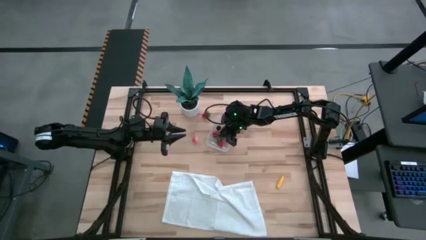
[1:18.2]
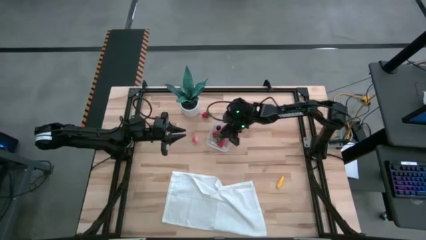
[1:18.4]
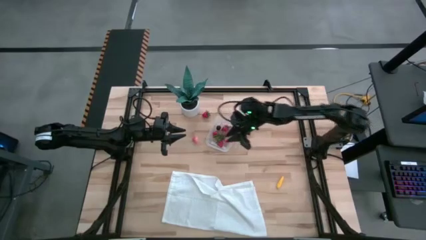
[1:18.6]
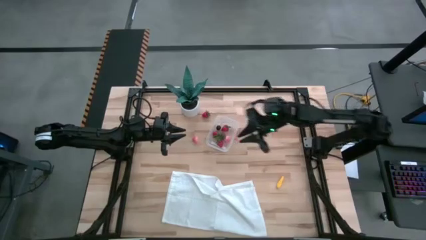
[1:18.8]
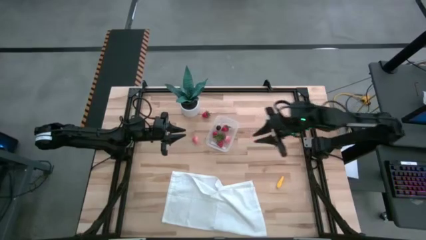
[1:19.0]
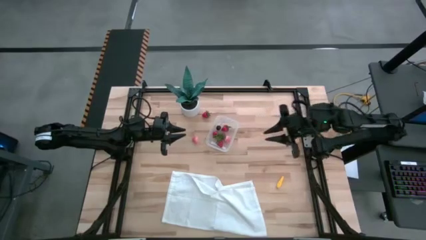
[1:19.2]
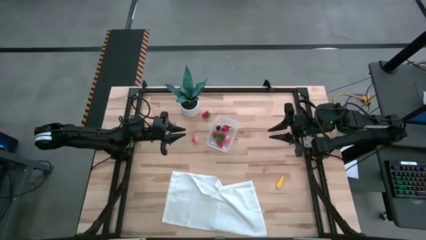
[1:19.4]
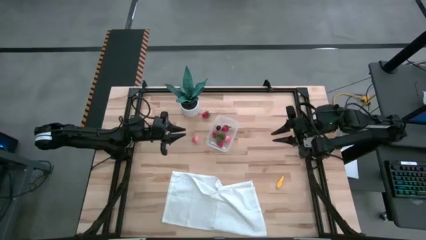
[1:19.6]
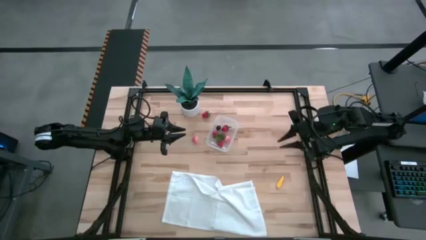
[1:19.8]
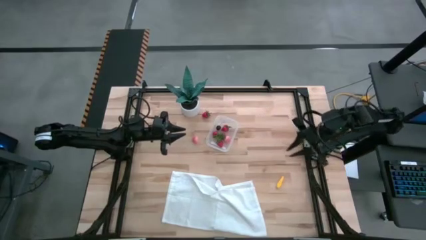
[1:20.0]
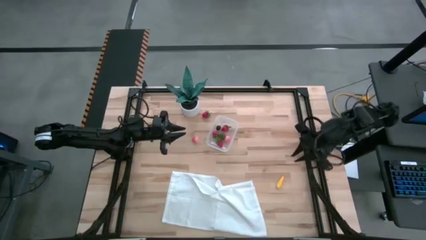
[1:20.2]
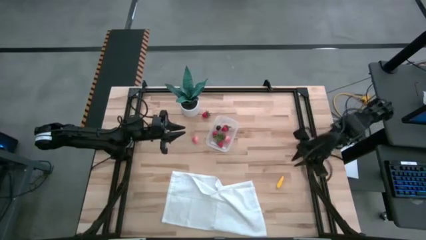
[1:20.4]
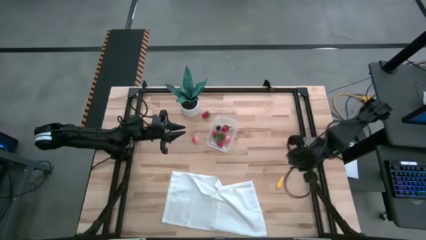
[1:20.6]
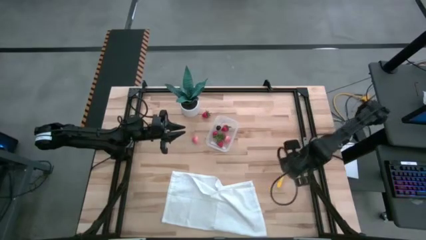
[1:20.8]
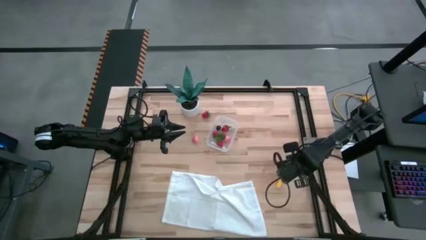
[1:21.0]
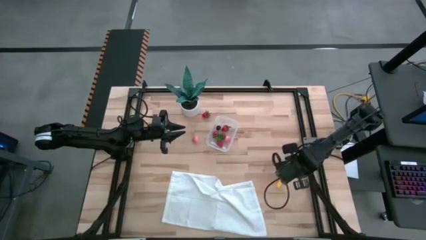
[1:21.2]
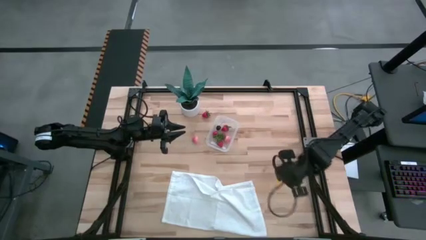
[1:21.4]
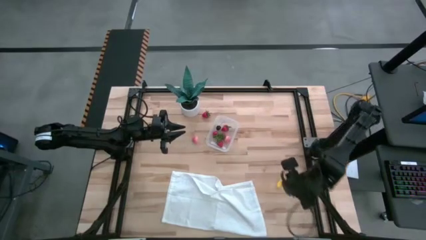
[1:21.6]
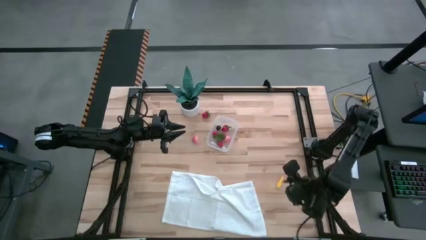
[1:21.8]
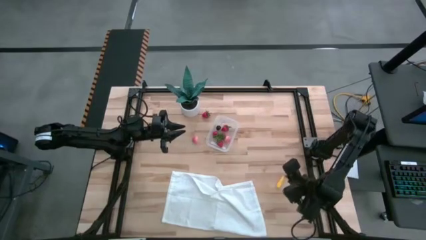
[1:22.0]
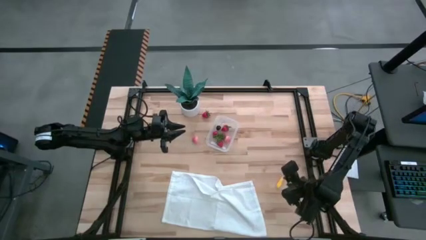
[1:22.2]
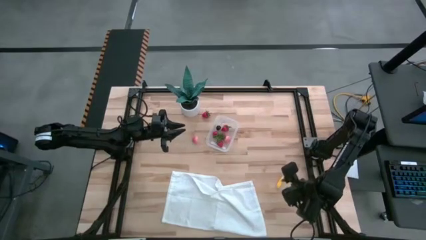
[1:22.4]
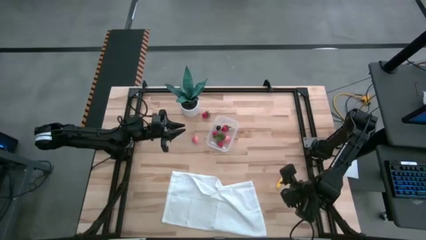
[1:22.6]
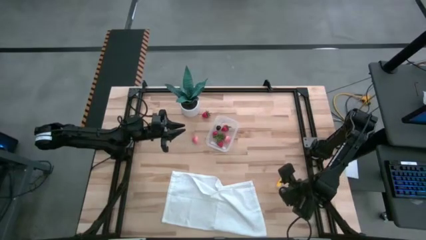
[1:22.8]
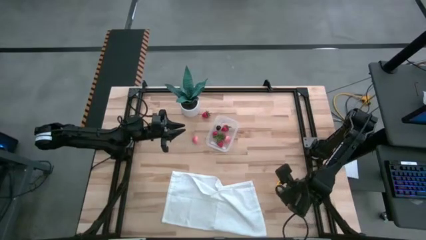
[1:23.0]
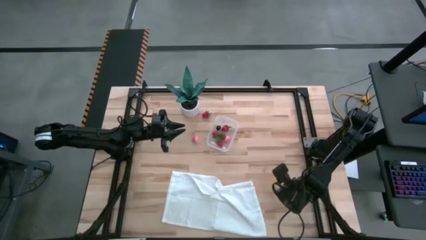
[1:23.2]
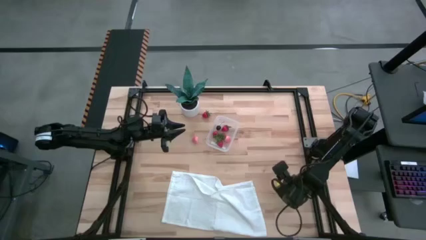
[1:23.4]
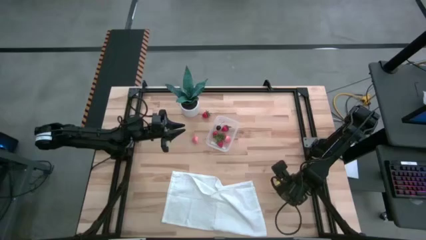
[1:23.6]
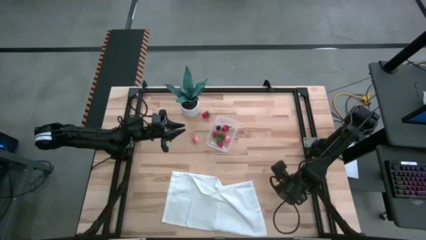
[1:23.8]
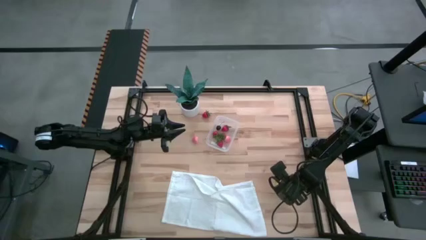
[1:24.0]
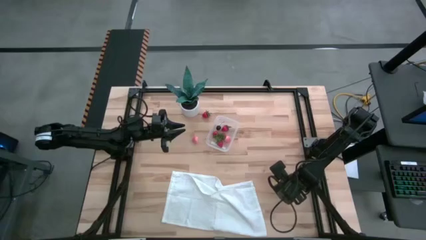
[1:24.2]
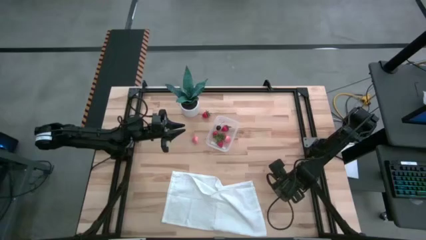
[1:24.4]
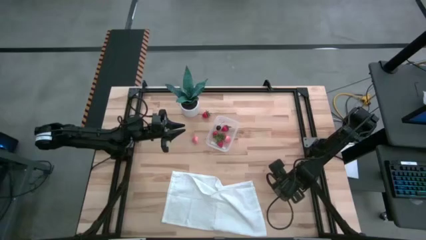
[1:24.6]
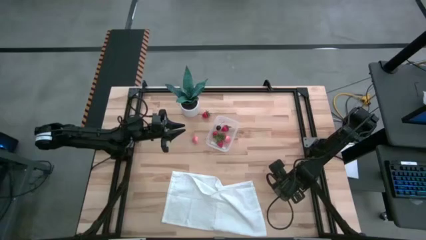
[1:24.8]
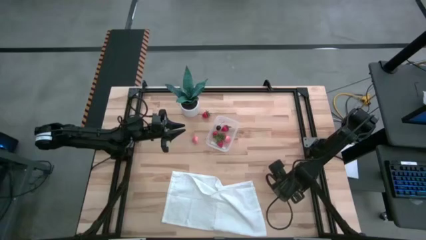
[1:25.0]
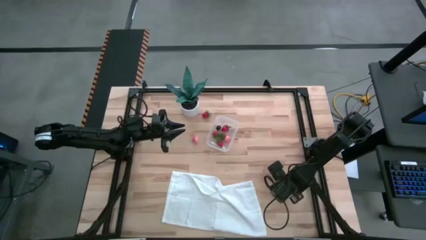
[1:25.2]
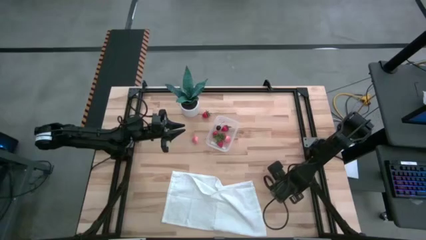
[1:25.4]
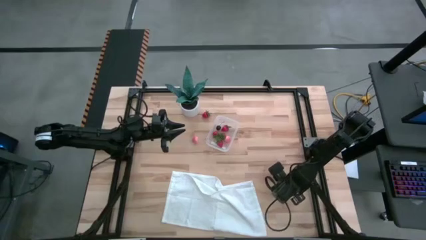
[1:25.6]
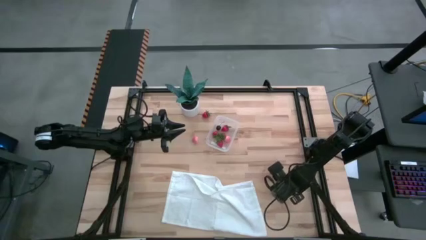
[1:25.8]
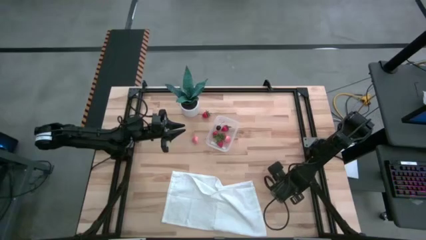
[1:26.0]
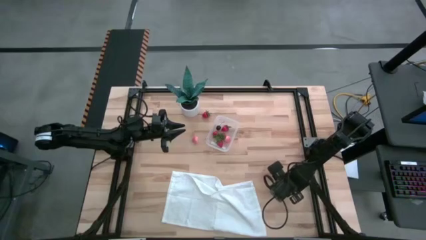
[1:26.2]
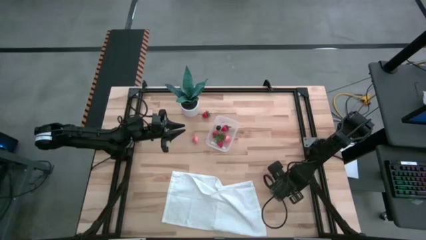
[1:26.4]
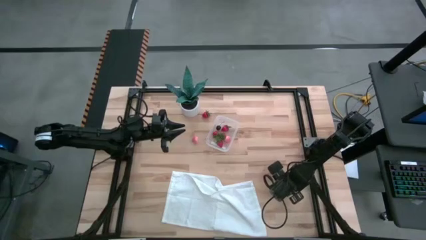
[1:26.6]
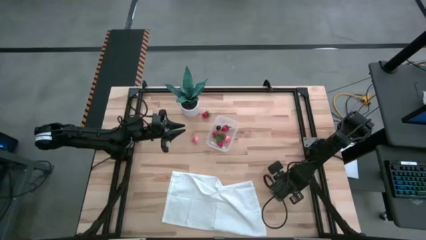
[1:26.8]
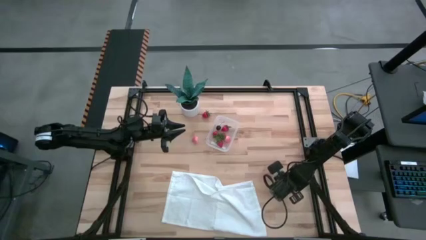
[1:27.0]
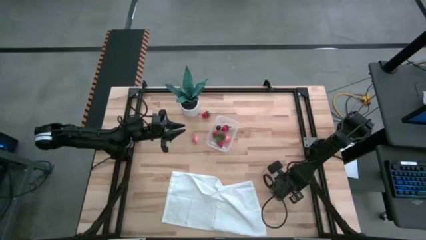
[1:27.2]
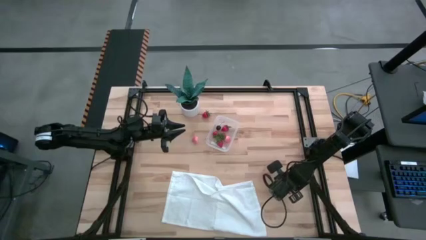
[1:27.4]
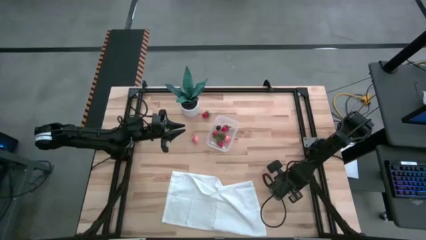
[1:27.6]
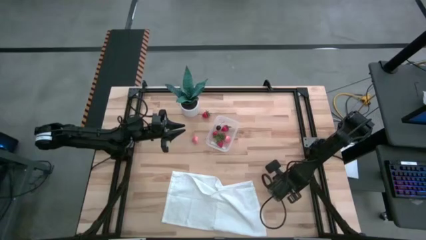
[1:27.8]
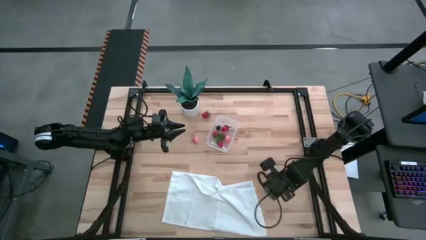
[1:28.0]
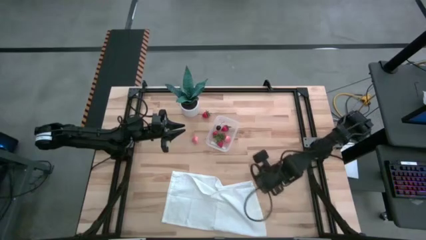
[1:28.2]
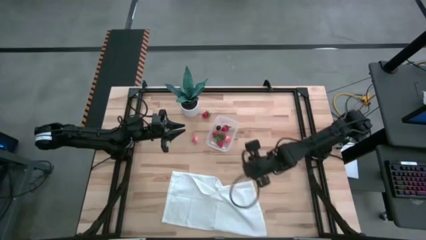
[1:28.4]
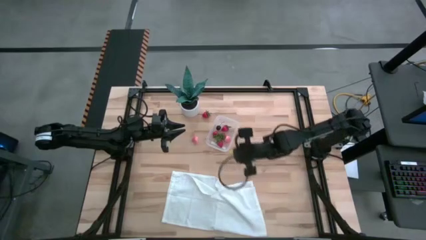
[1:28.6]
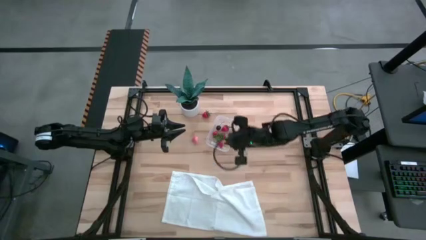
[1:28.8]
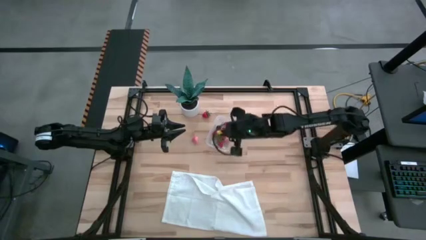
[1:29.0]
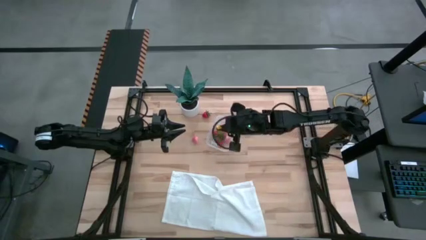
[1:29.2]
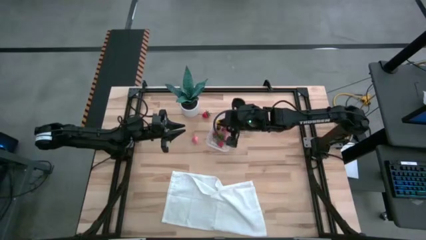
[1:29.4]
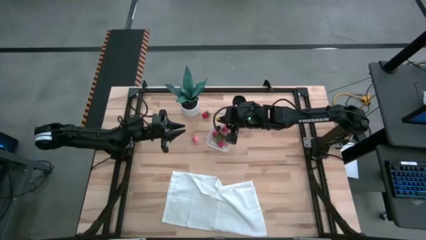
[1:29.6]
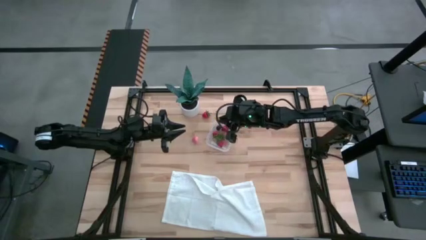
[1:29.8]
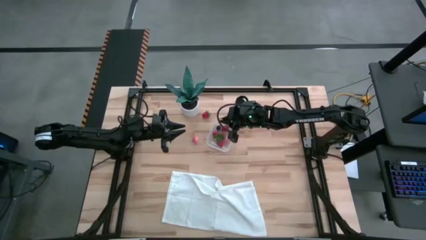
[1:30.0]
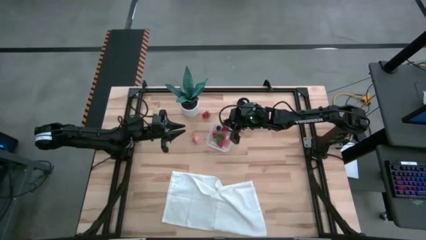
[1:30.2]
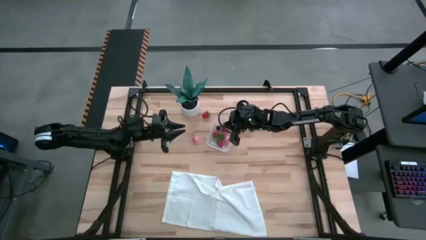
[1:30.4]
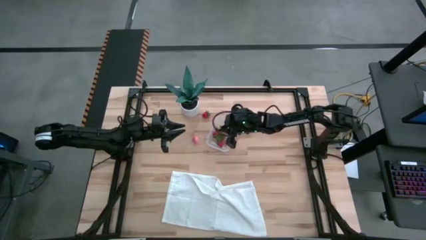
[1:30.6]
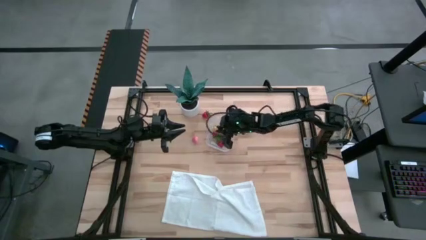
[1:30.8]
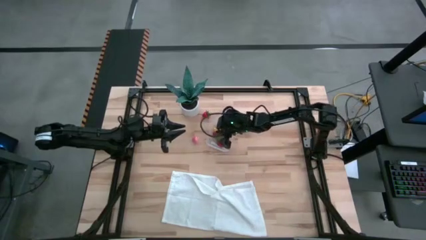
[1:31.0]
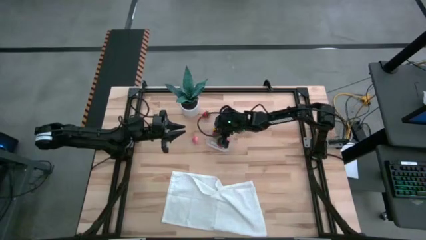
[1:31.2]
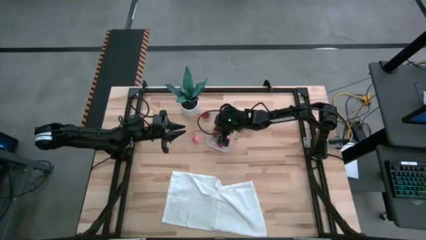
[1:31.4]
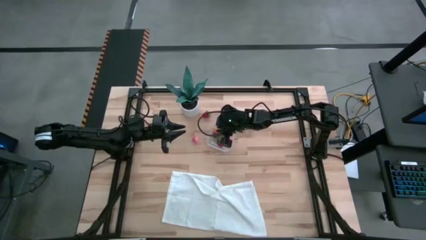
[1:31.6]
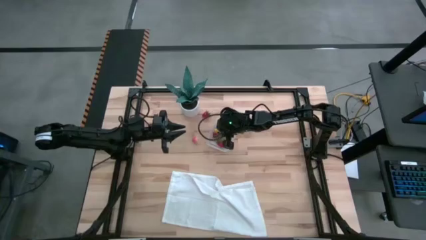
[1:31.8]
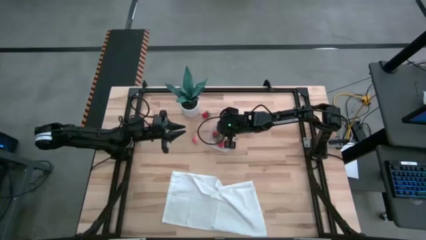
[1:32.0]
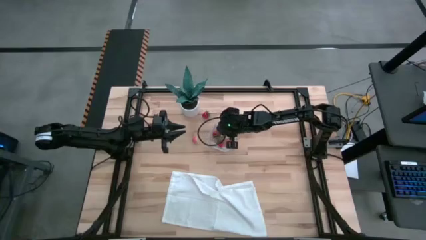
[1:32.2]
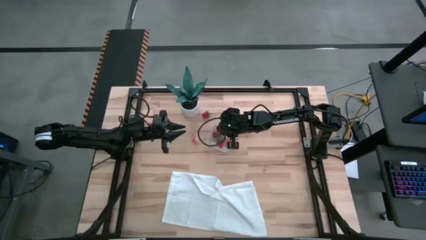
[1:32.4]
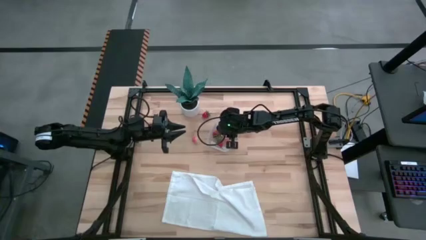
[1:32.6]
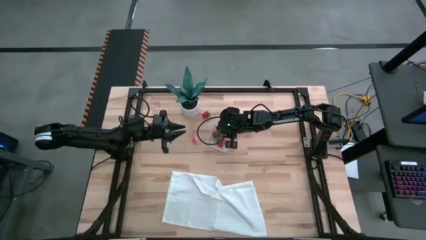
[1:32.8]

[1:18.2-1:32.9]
Task: Pick and placing Produce into tupperware
Put the yellow corn into the transparent bin
